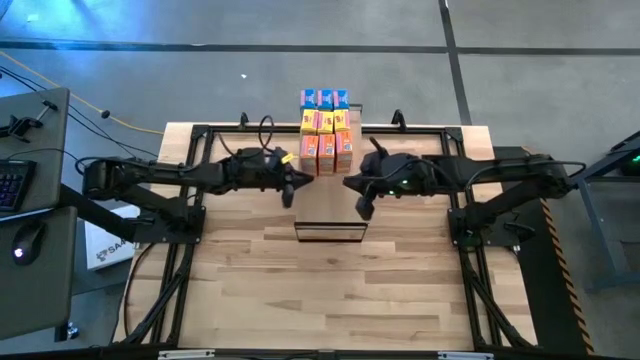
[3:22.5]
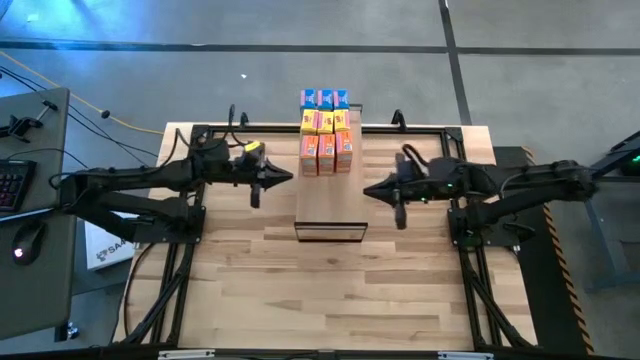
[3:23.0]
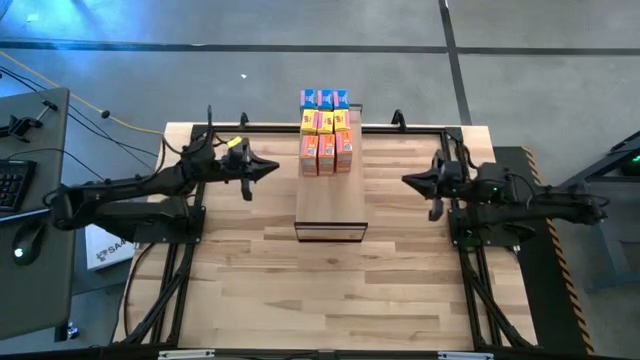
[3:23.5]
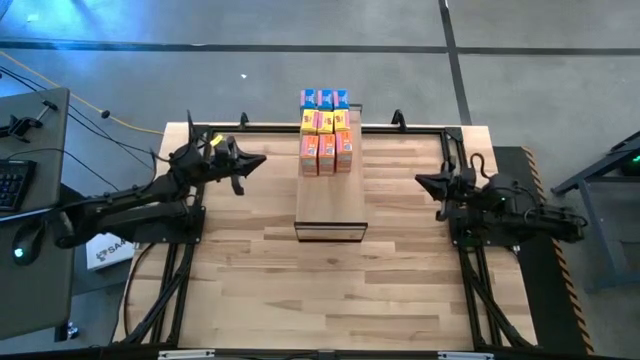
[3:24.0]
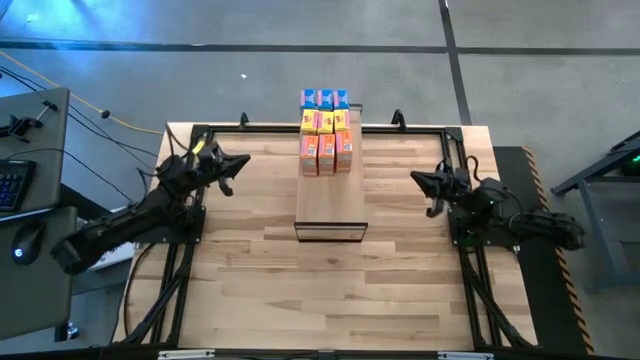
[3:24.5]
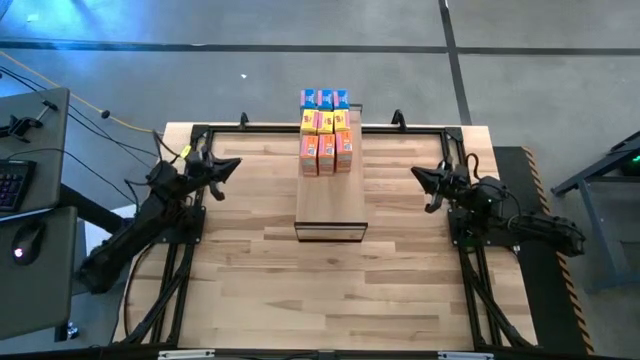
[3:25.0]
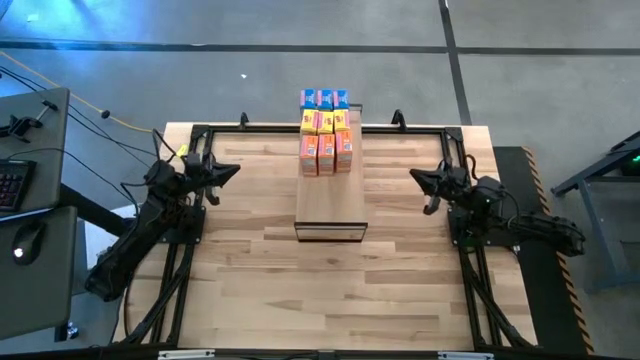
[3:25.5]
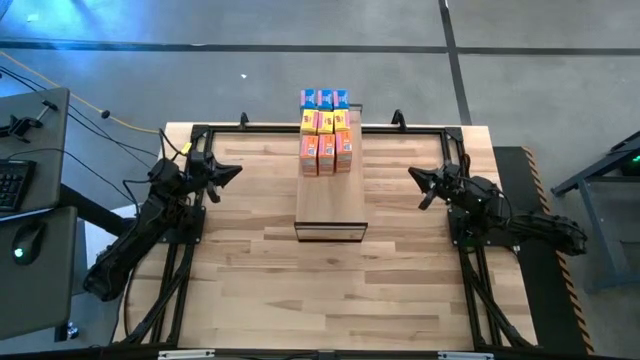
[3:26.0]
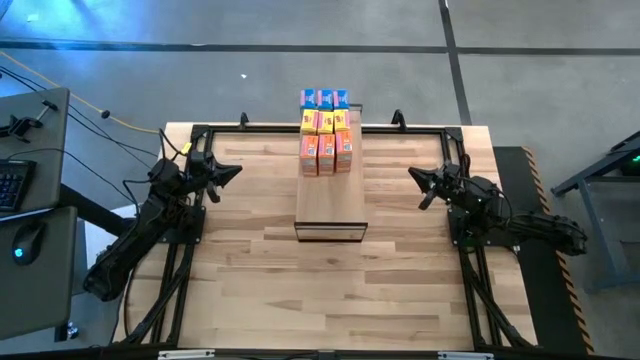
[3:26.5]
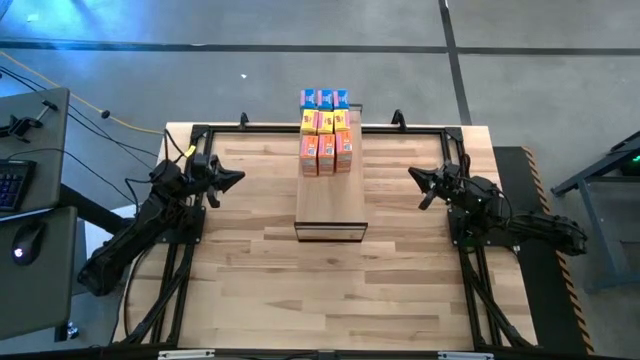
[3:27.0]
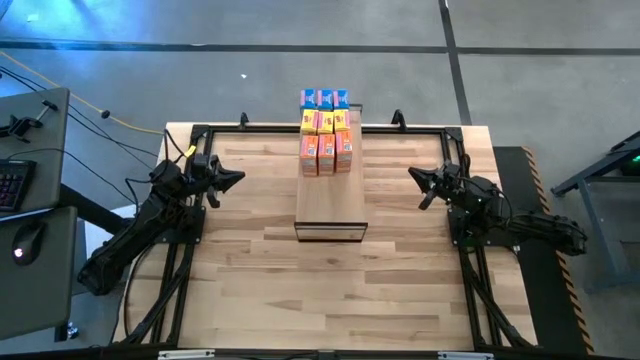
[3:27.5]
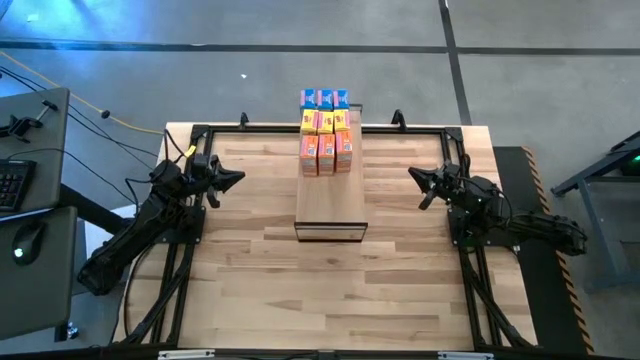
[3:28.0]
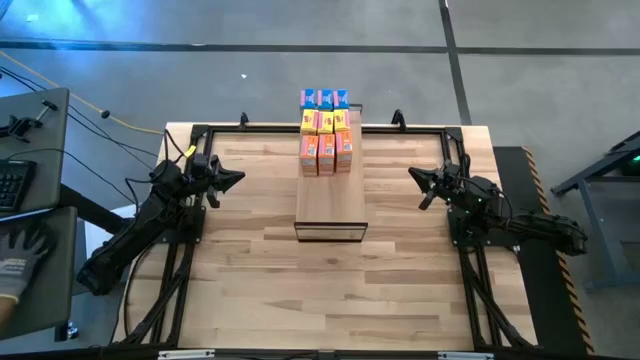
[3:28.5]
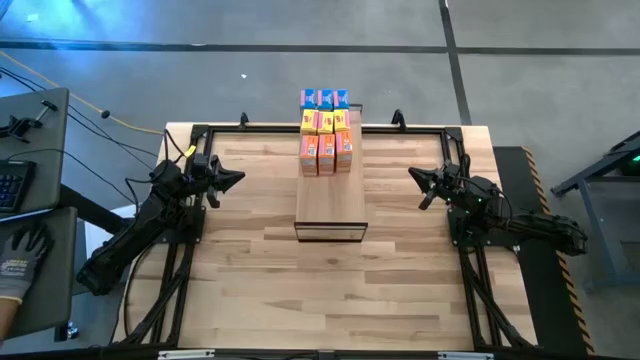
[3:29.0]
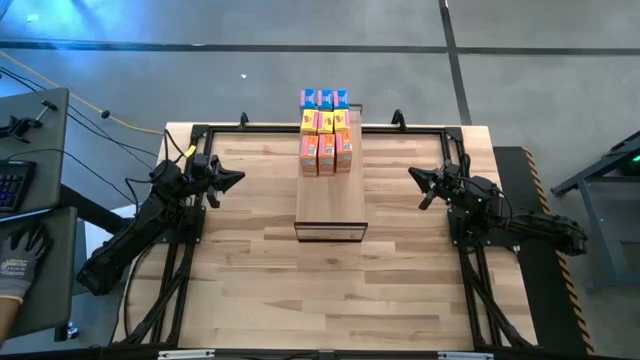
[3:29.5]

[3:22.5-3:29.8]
Task: Stack cereal on shelf
Return to Home Position

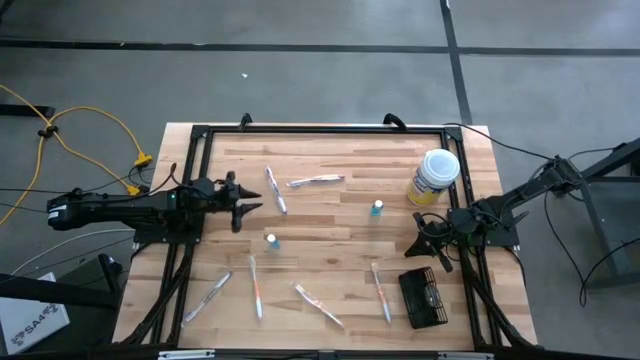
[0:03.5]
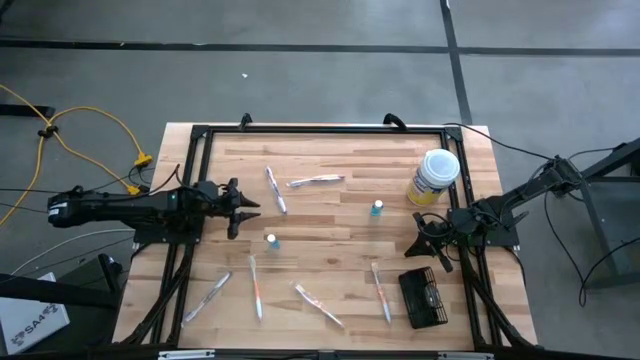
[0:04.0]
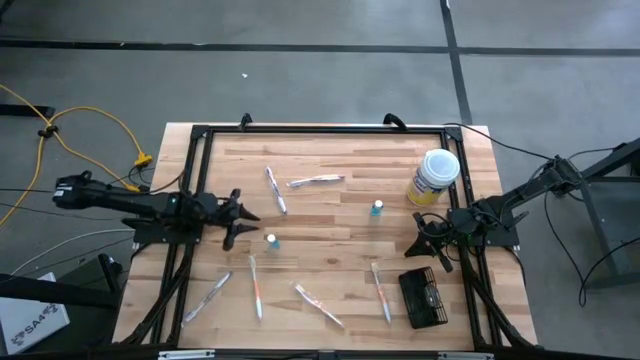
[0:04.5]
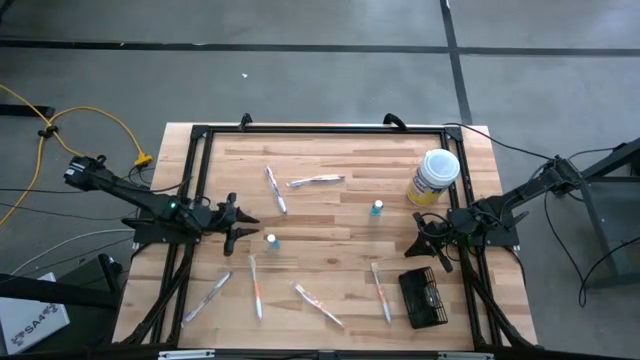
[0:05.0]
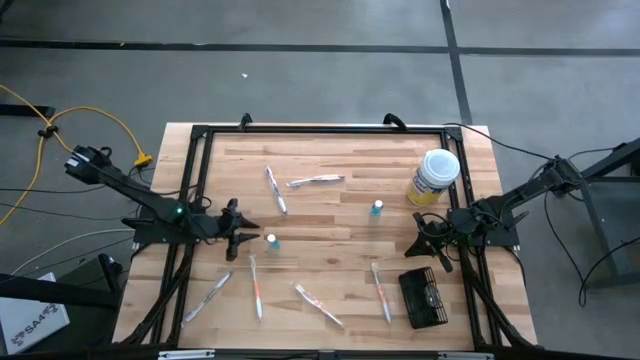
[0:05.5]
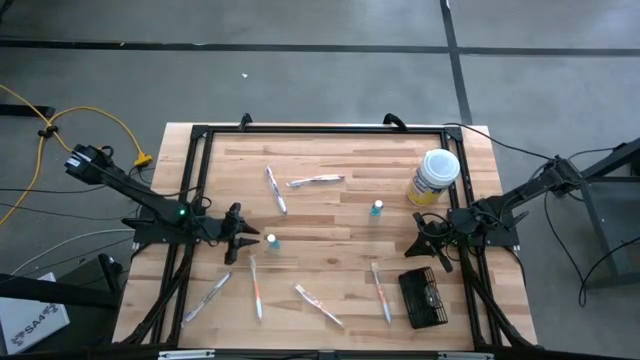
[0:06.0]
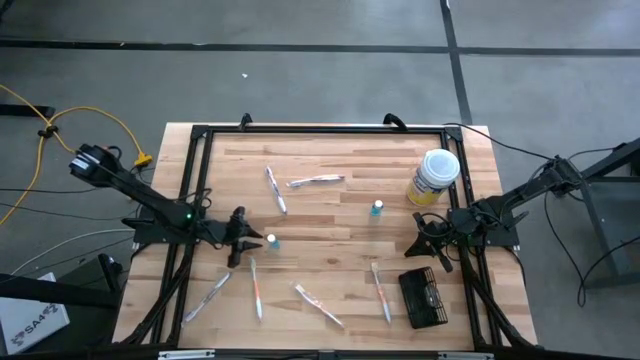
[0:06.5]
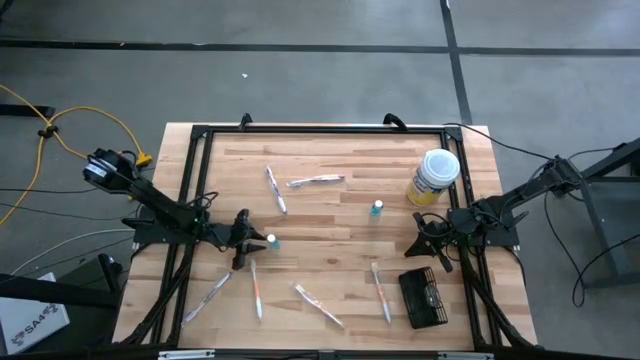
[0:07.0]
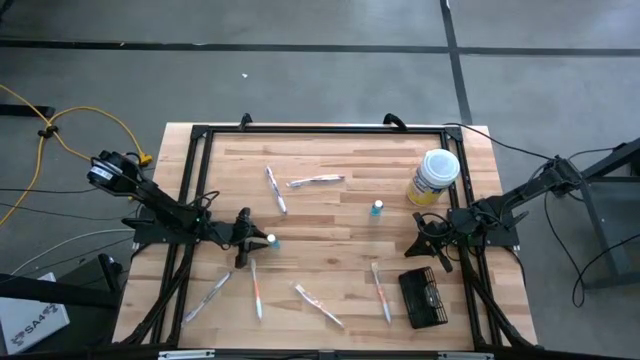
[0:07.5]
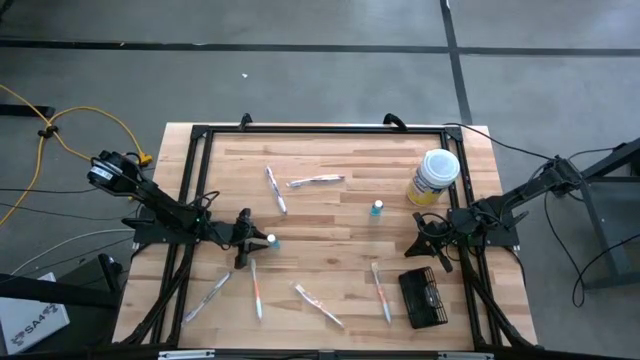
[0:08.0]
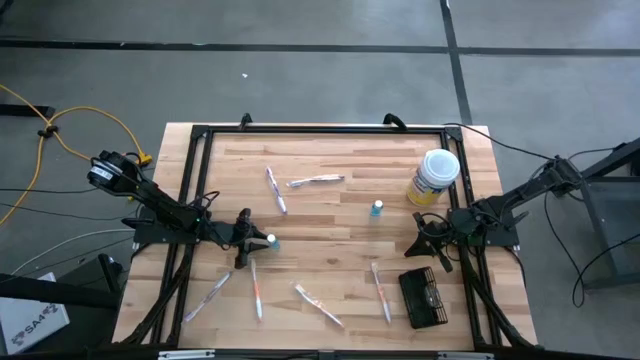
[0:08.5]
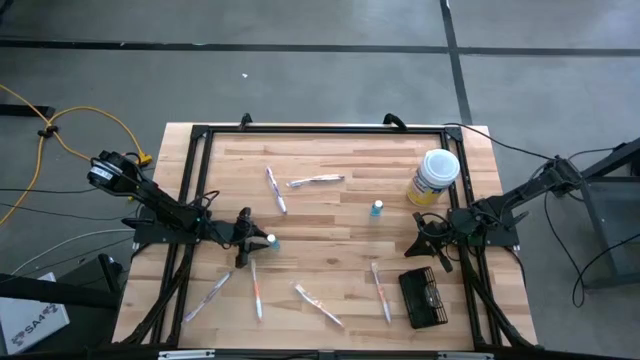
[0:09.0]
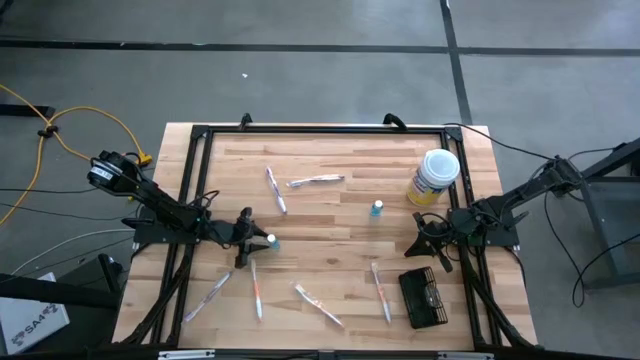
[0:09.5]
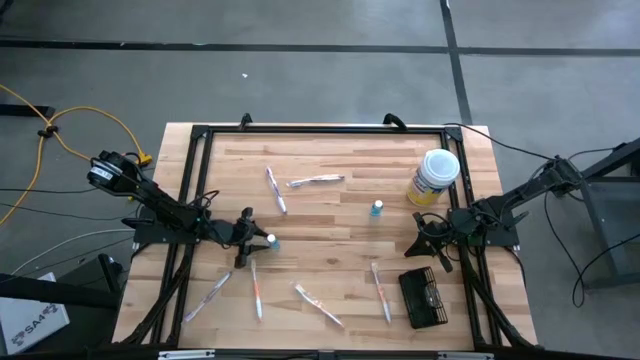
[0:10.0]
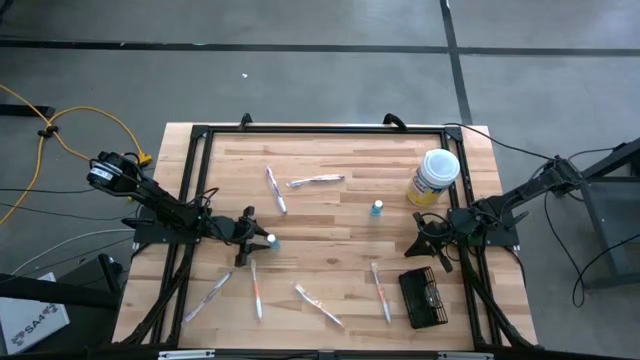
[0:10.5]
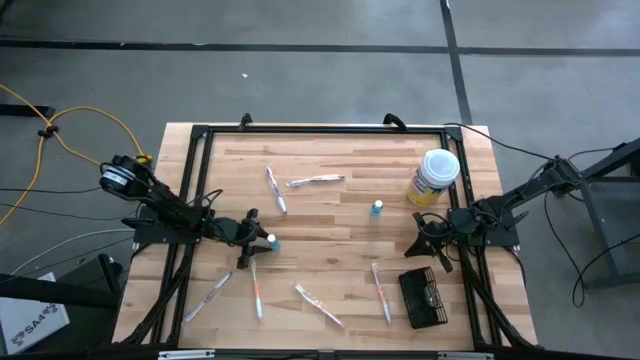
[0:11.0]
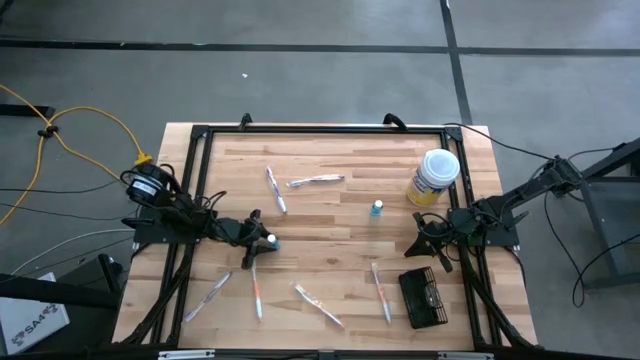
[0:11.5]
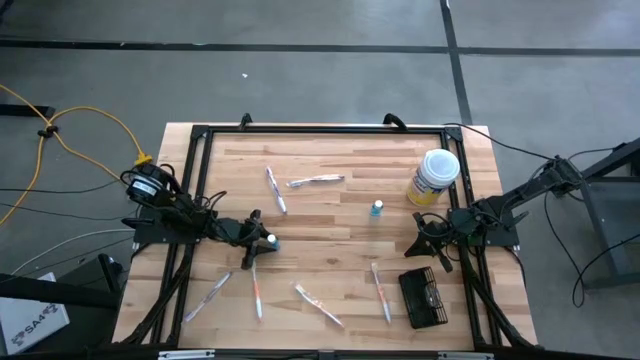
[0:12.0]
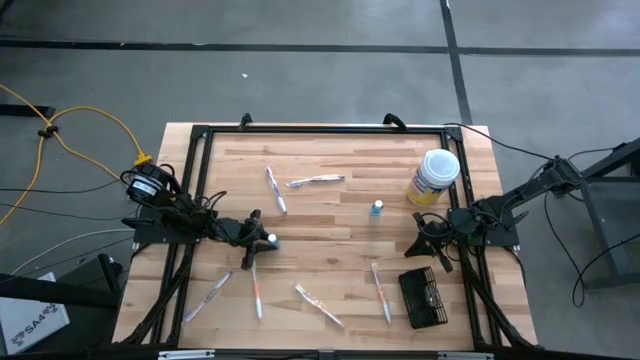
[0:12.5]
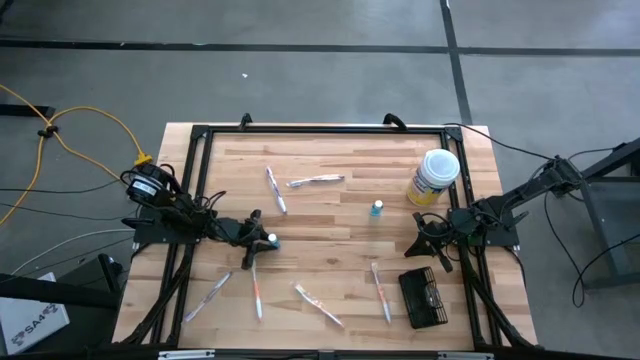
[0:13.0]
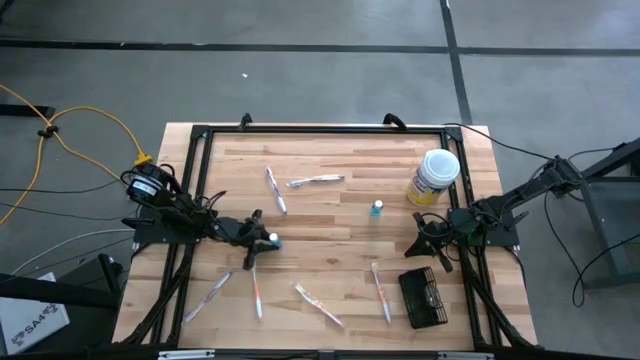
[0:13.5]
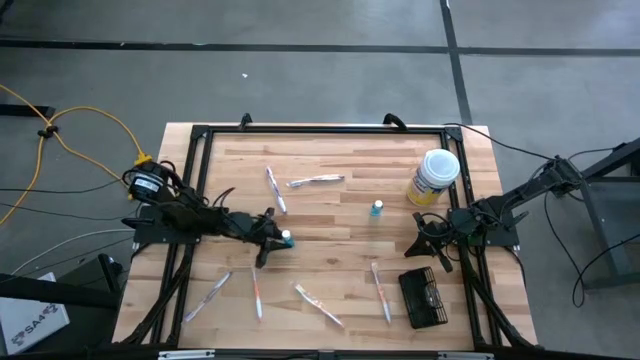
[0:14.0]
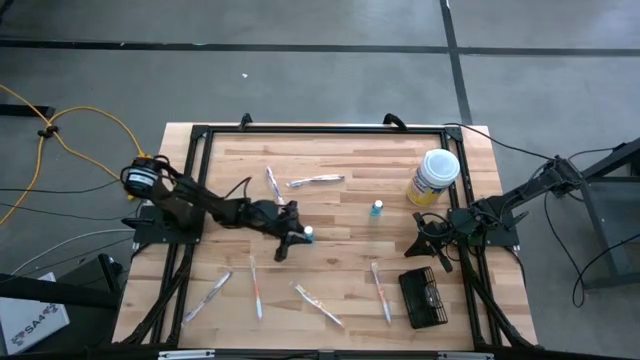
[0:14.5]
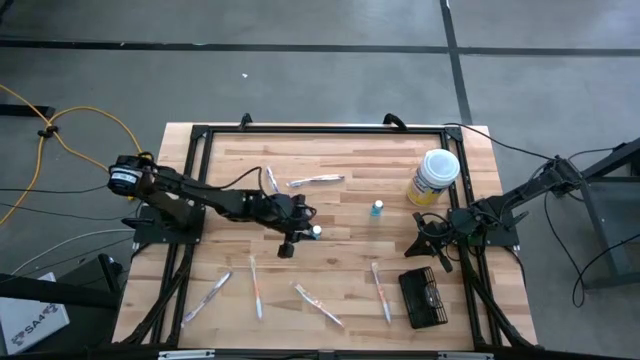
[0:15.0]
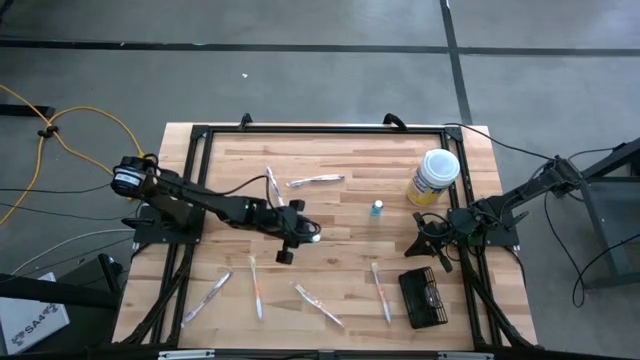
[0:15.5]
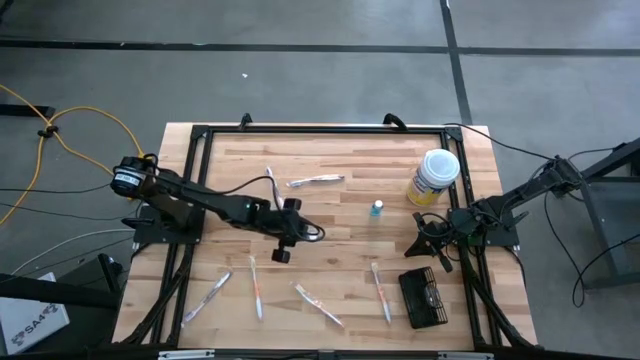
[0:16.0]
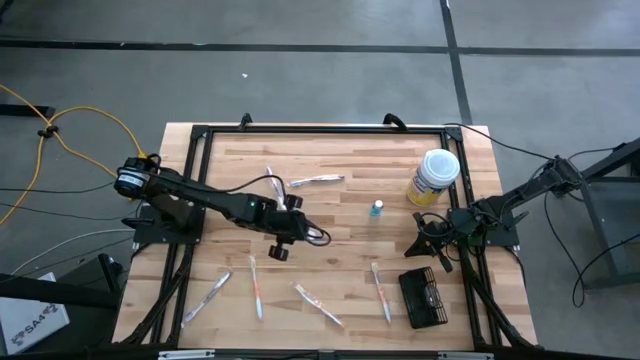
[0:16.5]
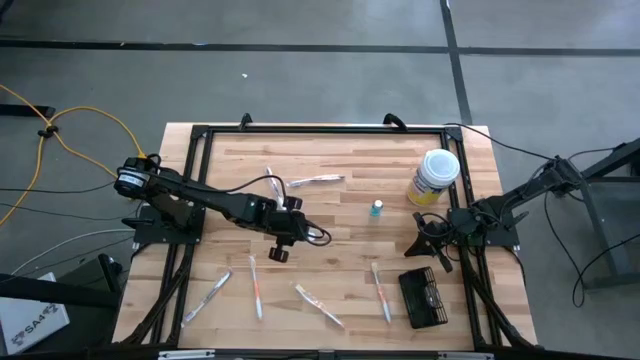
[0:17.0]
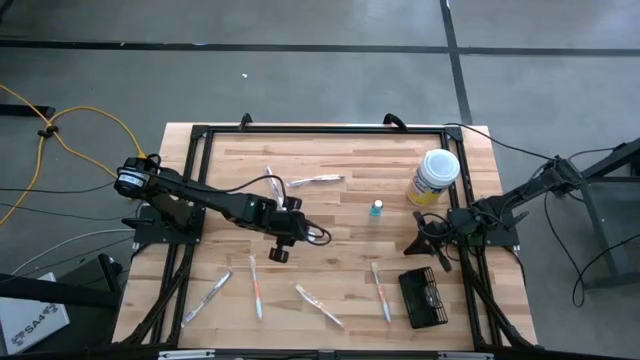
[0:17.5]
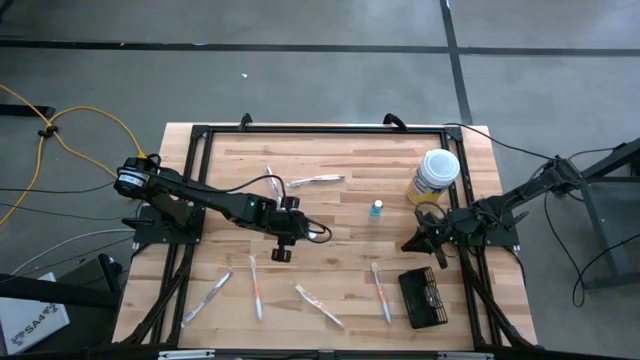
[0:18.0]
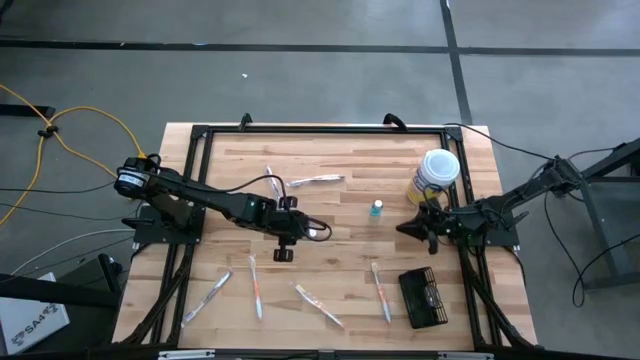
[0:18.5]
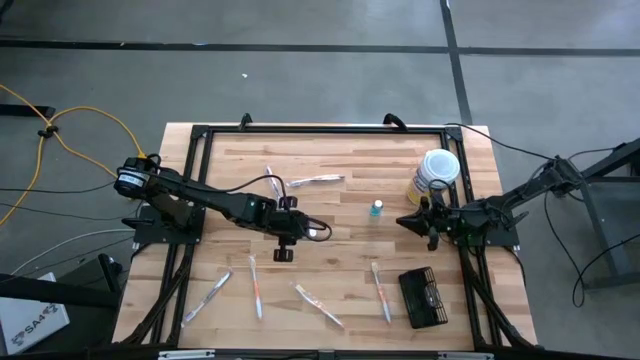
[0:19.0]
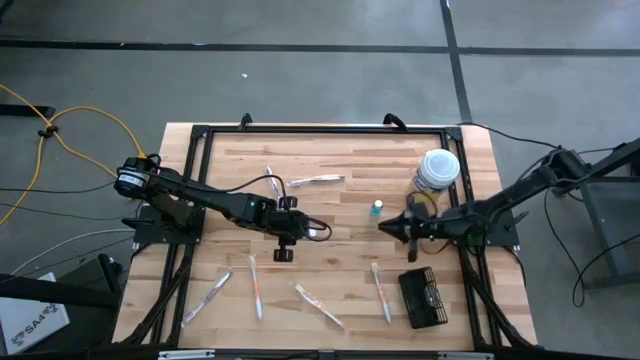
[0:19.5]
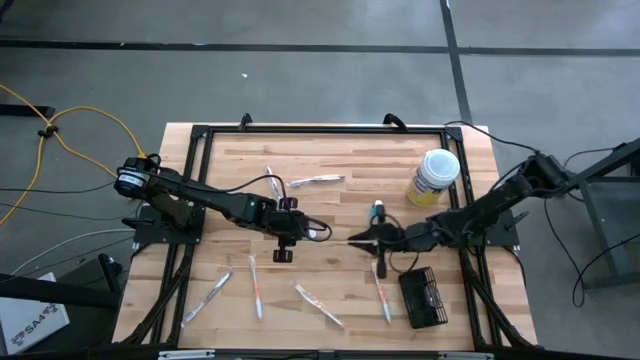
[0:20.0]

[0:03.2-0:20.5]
Task: Pick & Place toothbrushing station
Put the blue mouthwash into the mesh organizer
